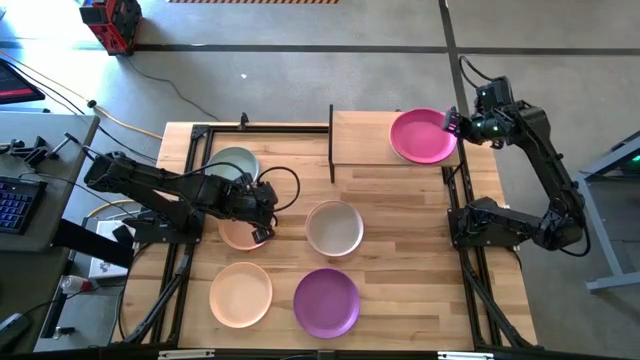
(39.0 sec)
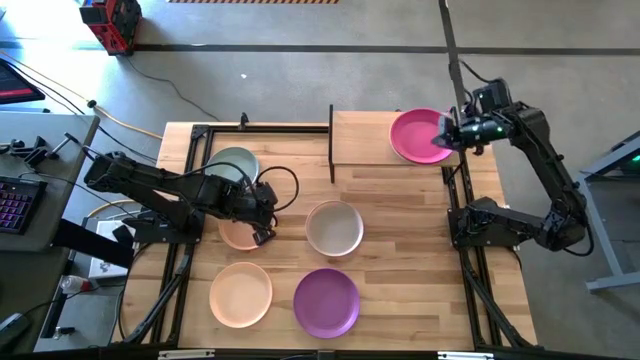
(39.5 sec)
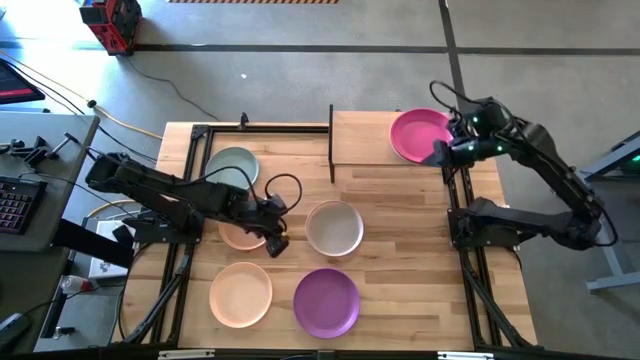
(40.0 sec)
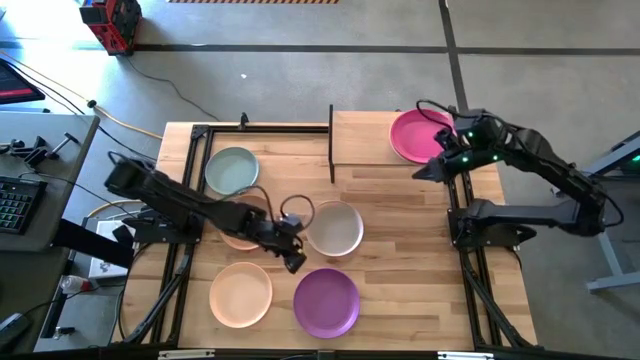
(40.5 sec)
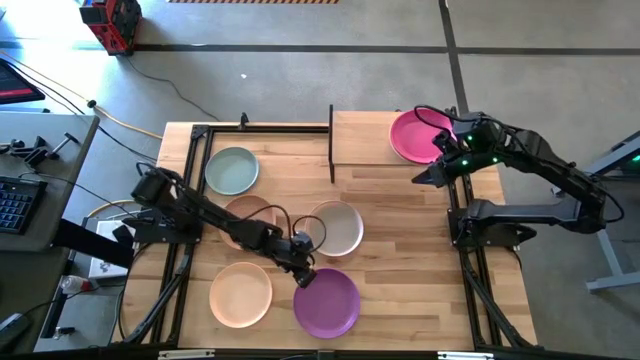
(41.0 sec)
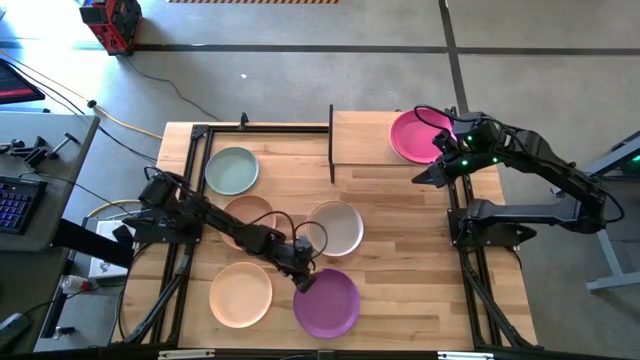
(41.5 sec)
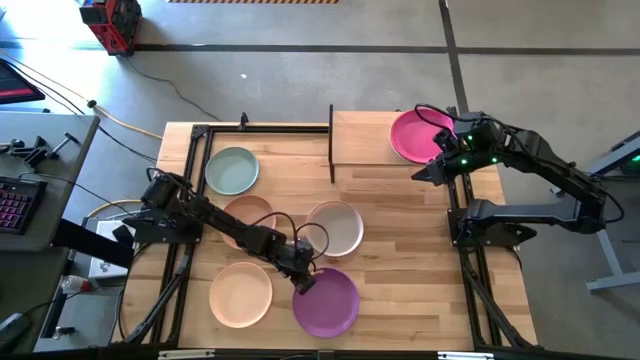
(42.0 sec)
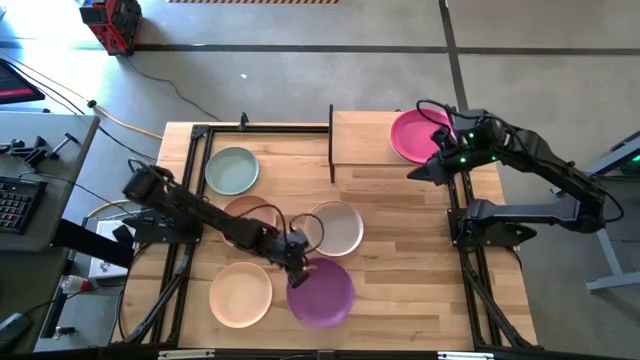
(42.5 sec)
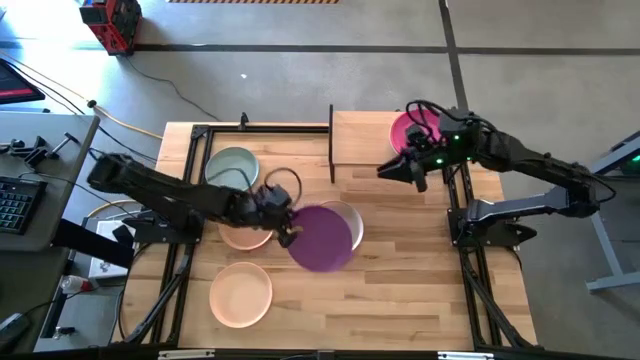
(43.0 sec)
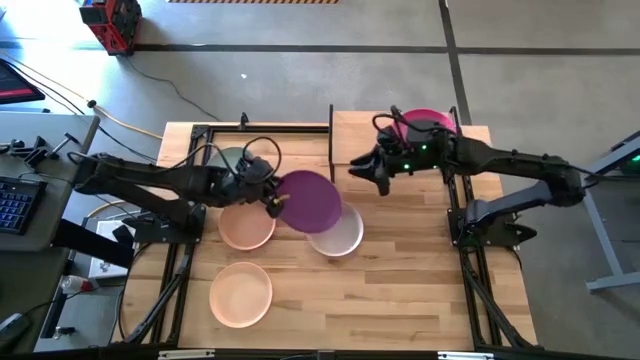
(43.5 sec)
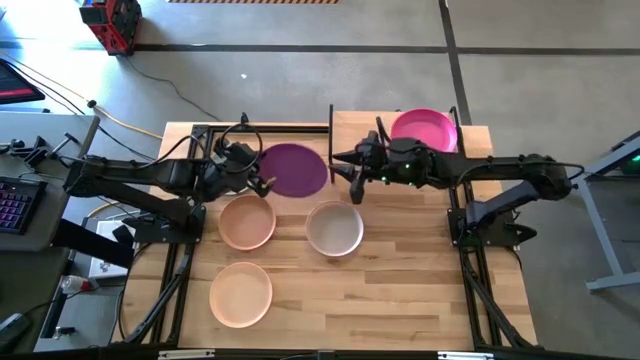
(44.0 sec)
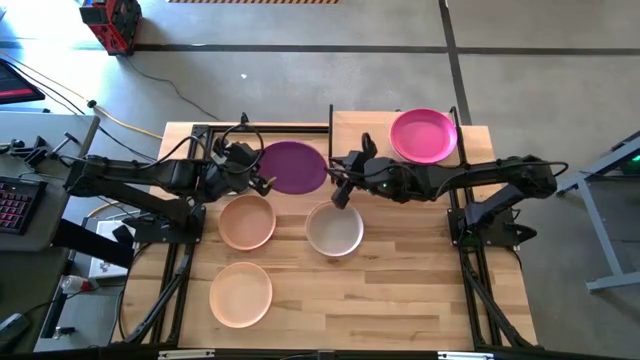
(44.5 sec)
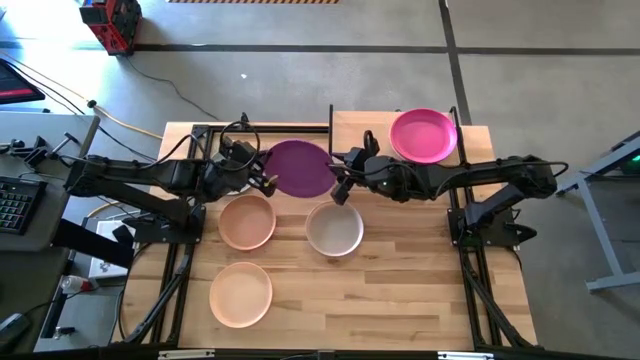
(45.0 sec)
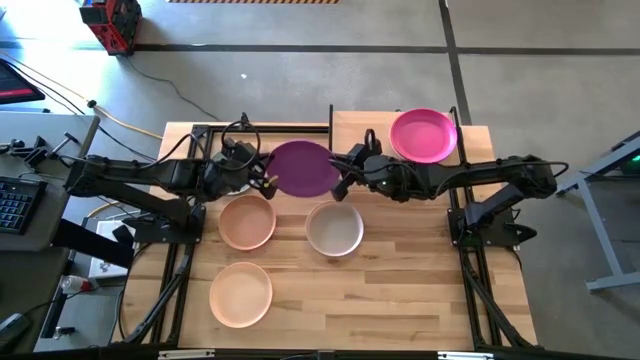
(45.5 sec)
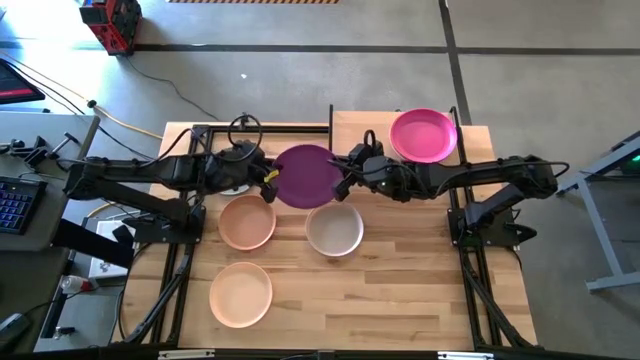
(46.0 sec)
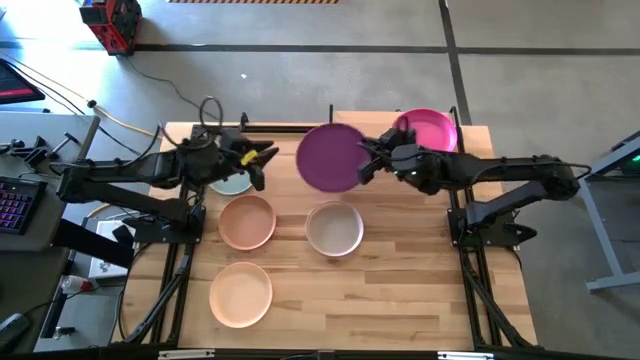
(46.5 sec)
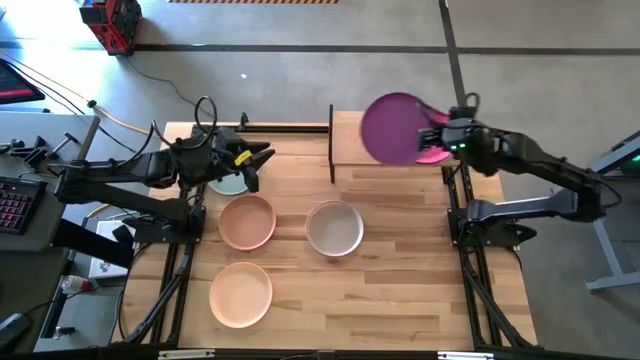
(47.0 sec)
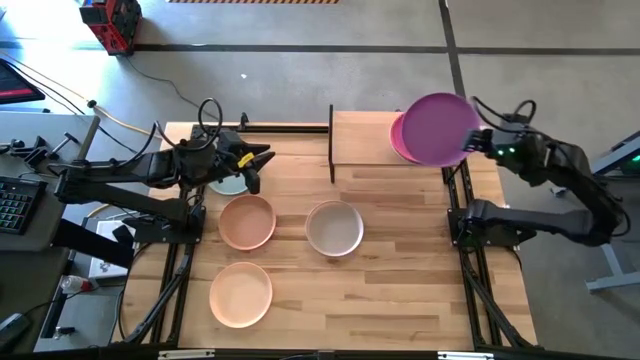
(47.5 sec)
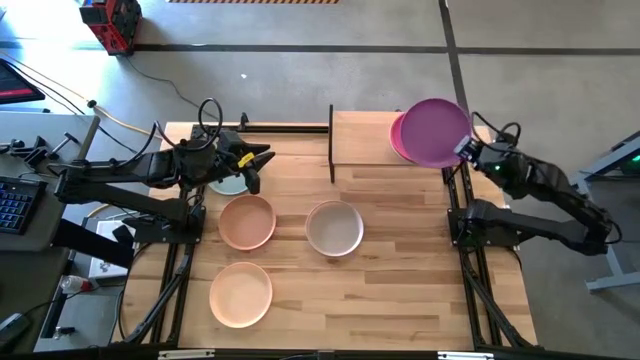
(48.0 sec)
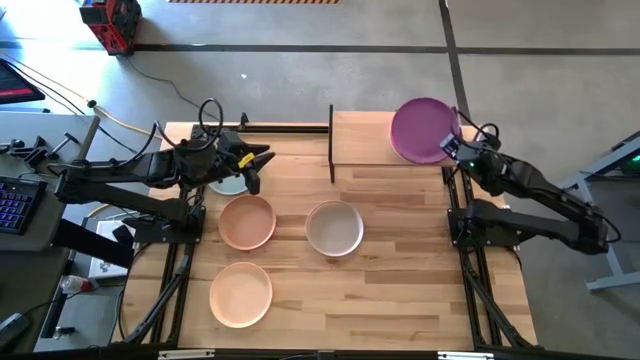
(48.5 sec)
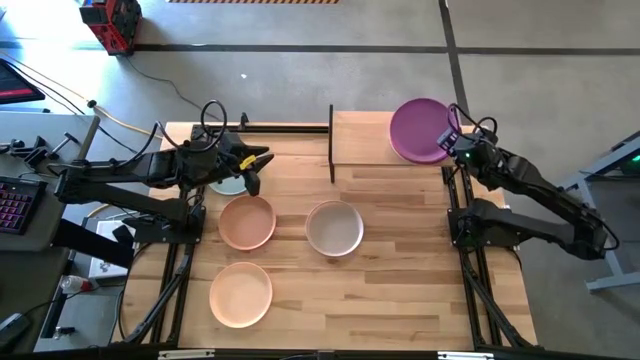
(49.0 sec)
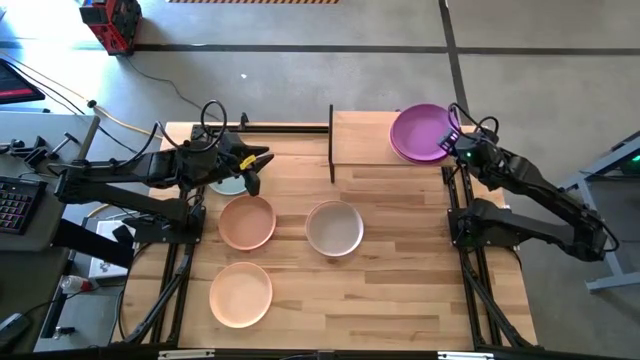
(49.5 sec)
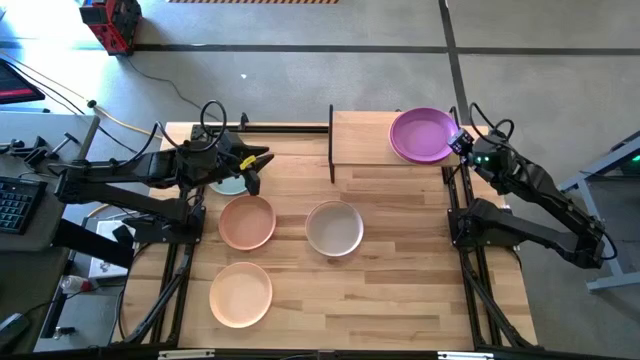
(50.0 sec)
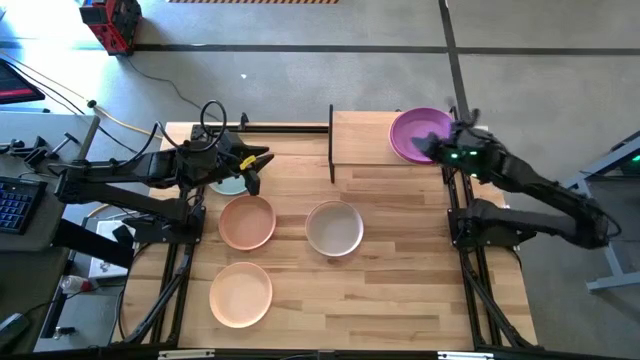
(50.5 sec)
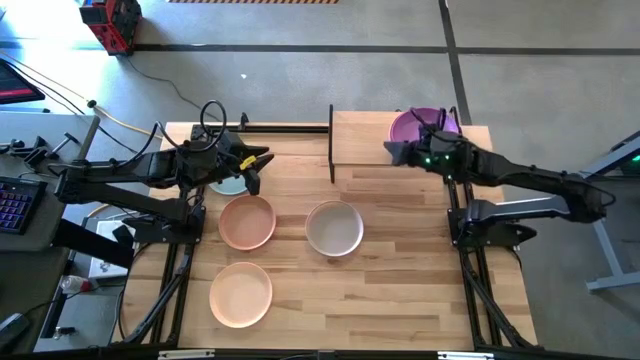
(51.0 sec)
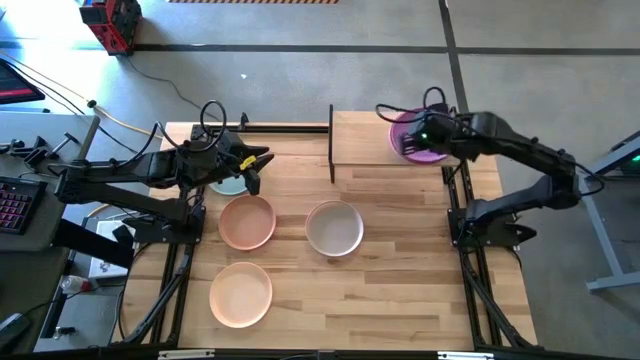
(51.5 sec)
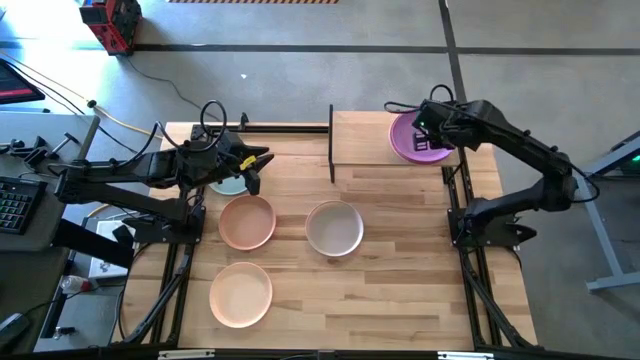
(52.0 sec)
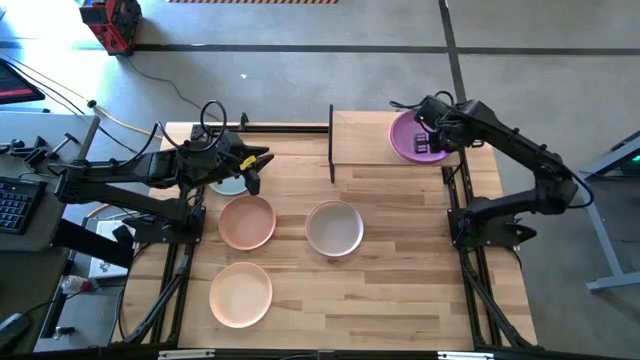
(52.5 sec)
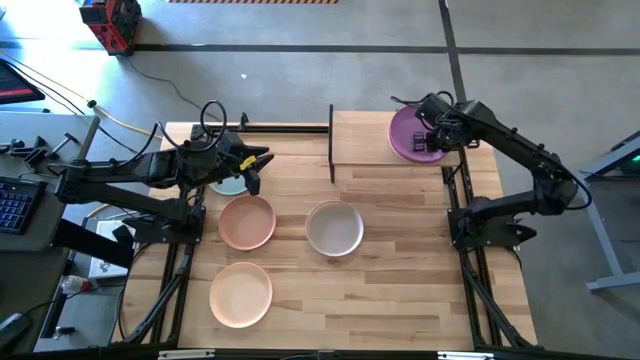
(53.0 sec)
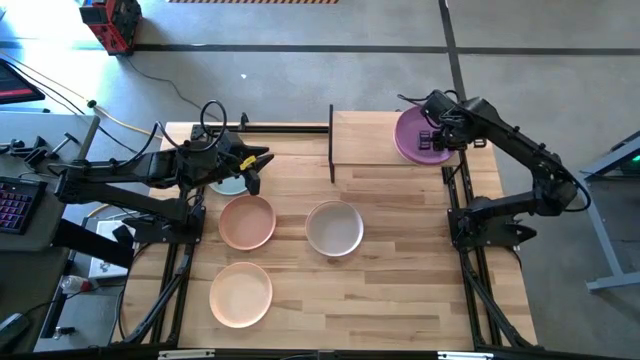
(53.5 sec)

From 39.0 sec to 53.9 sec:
Task: Place and stack plates onto a shelf
Stack the violet plate on top of the pink plate on the shelf

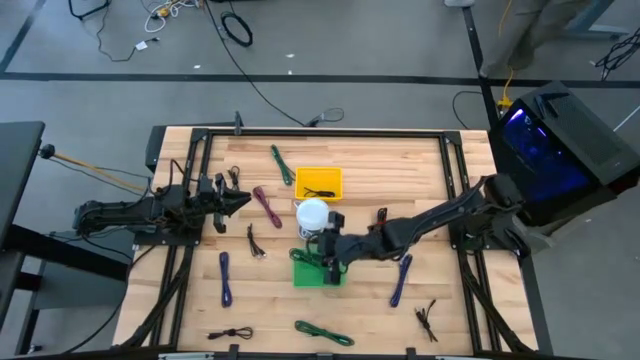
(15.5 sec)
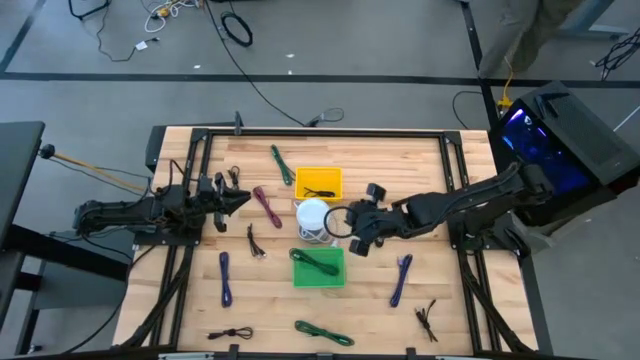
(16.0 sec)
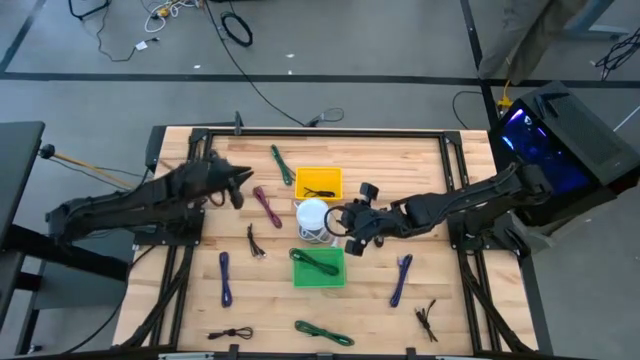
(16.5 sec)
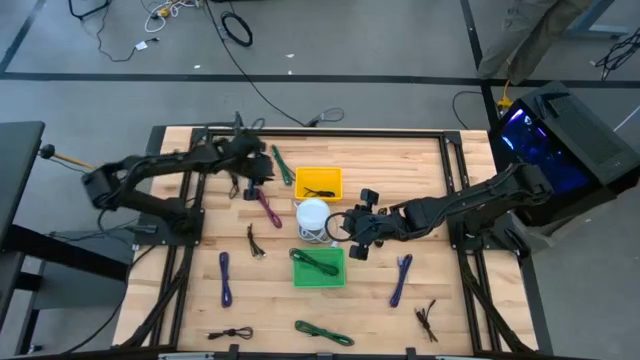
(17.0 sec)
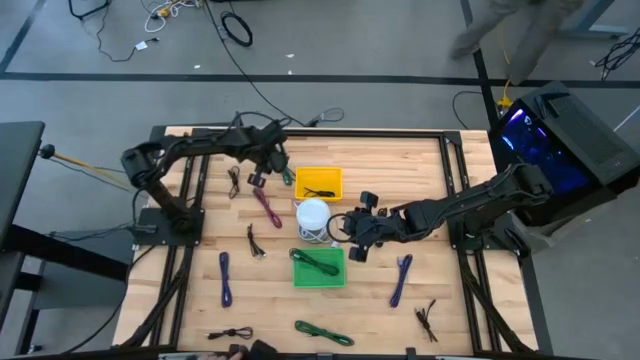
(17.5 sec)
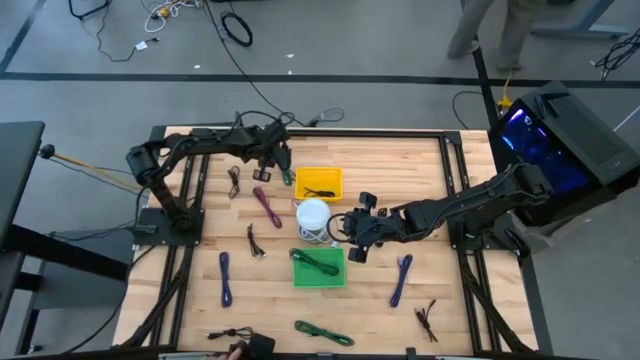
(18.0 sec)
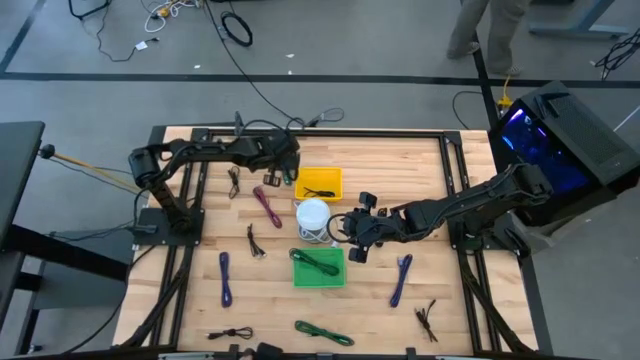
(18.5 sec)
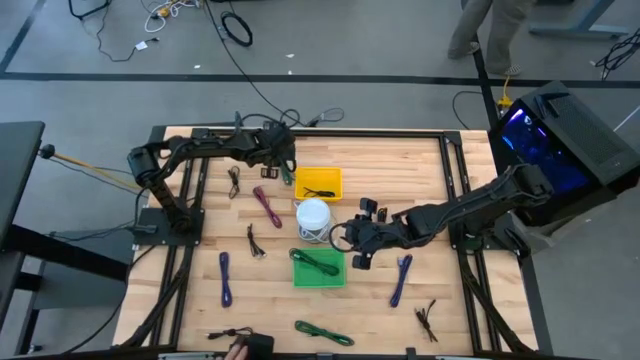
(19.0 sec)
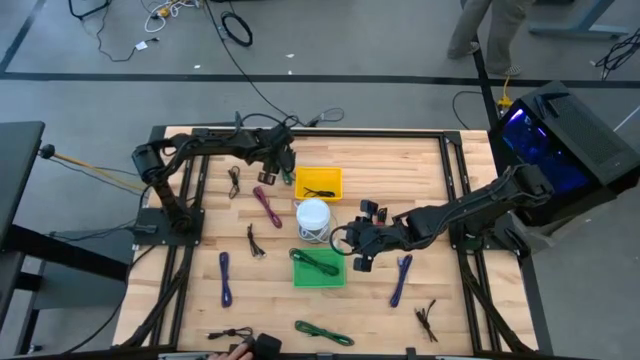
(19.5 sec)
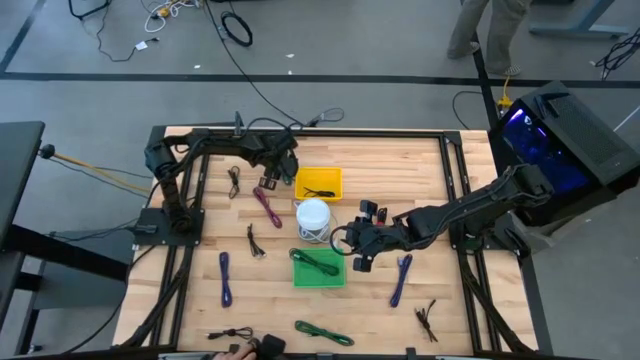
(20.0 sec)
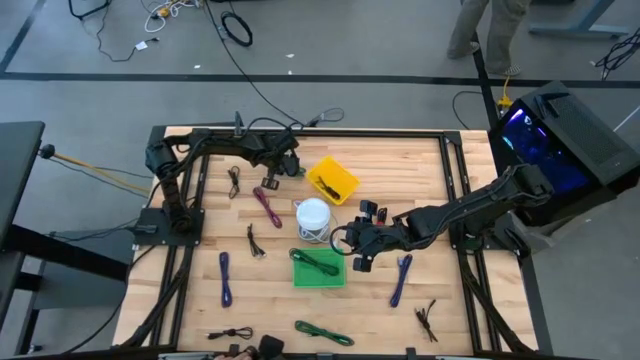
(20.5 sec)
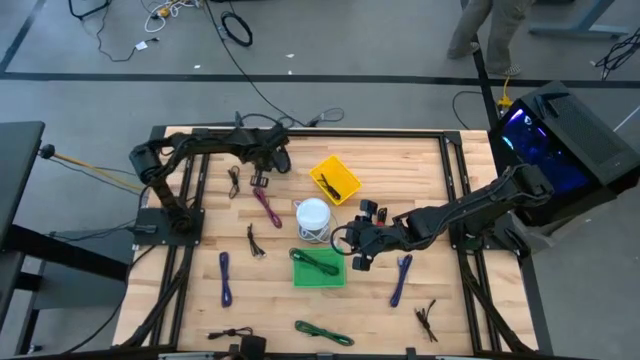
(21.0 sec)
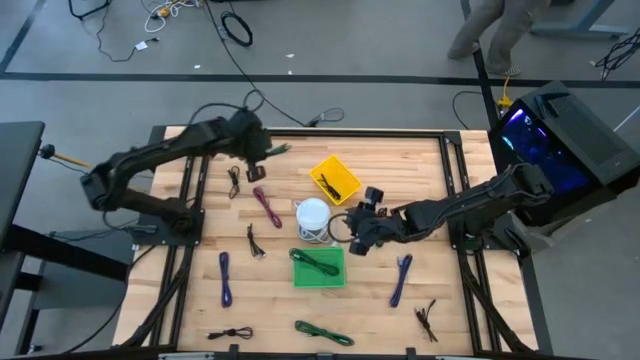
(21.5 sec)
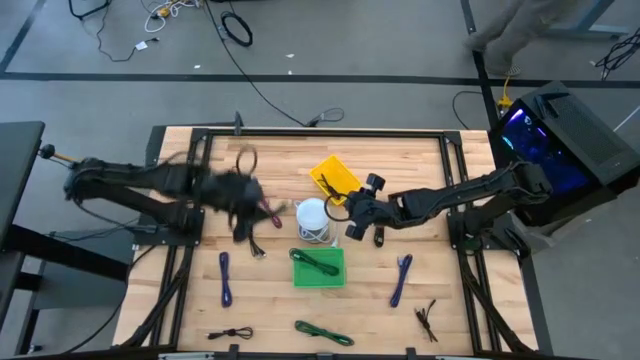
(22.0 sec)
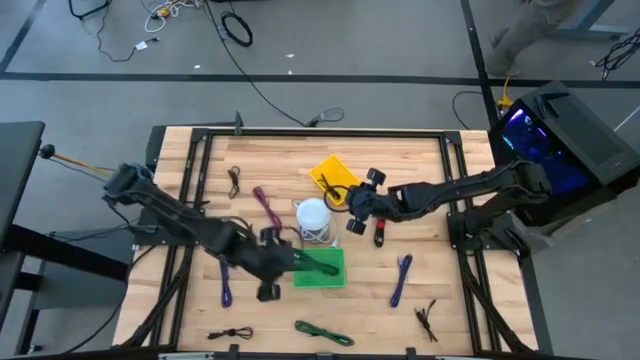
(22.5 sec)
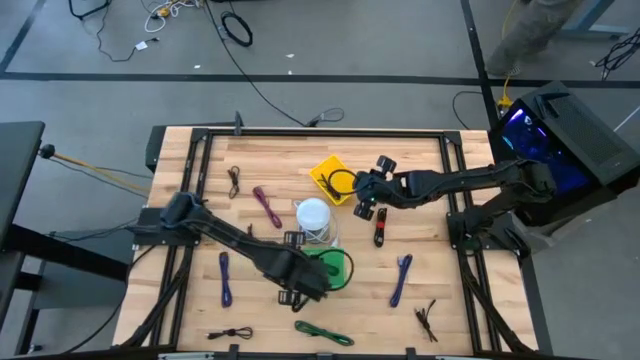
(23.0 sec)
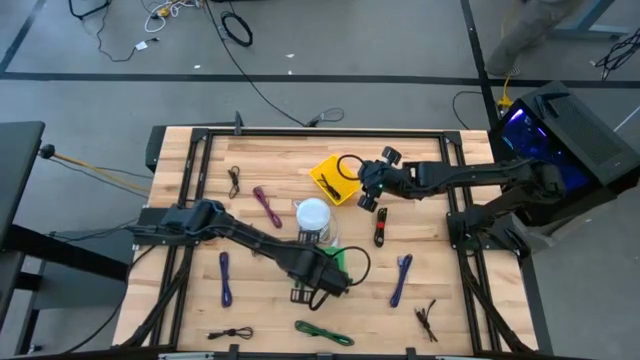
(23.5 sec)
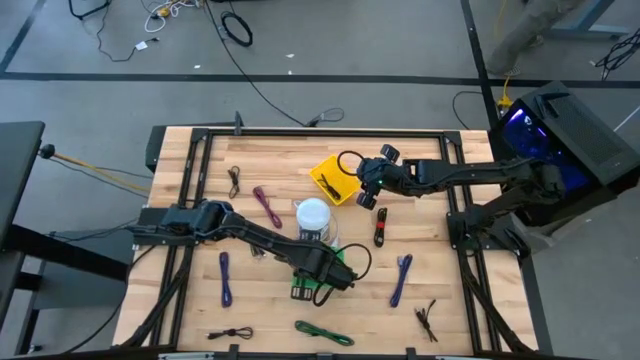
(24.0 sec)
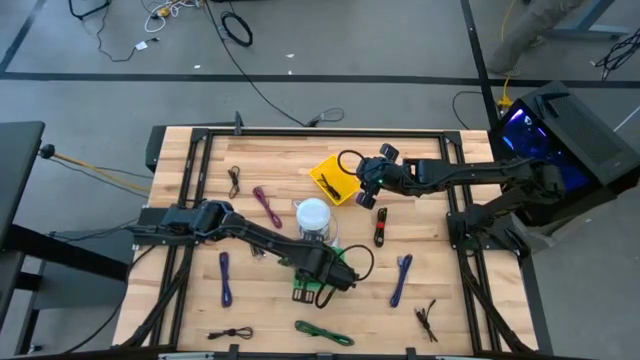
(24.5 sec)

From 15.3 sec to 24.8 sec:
Task: Pick & Place USB Port
Put the top green and black USB cable into the green bin
